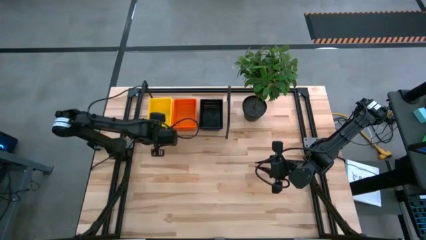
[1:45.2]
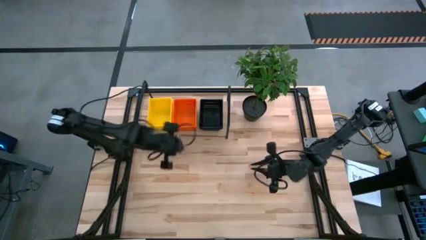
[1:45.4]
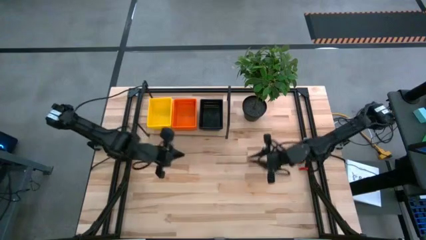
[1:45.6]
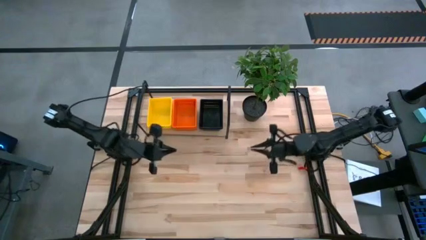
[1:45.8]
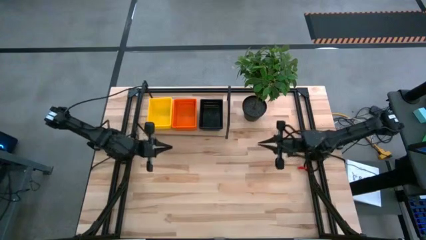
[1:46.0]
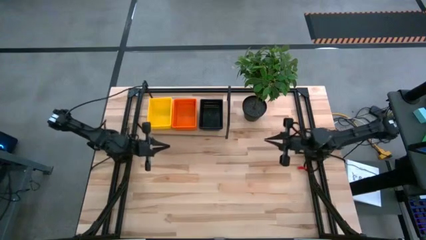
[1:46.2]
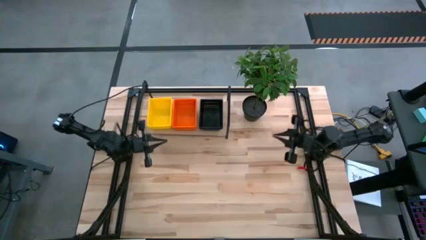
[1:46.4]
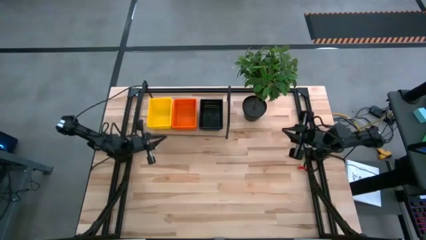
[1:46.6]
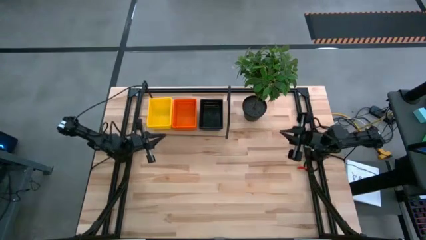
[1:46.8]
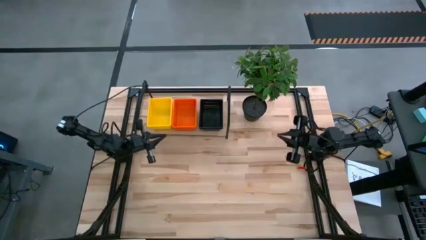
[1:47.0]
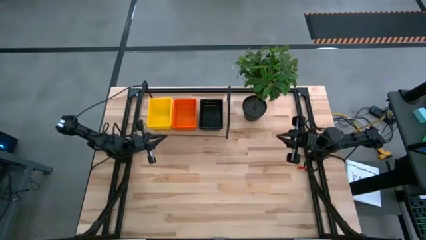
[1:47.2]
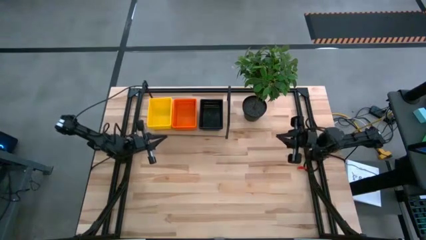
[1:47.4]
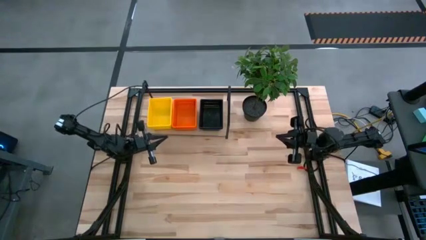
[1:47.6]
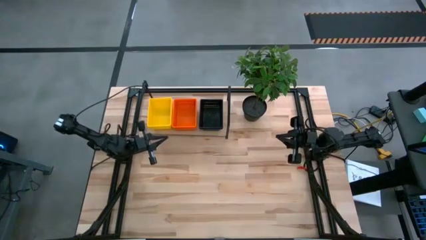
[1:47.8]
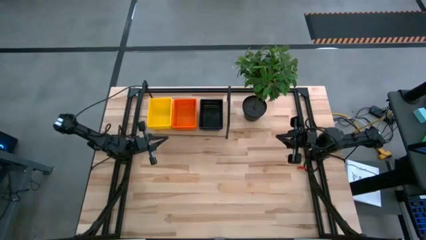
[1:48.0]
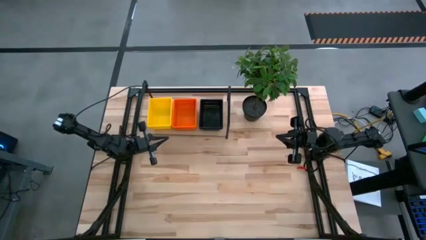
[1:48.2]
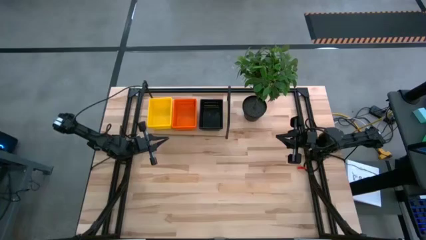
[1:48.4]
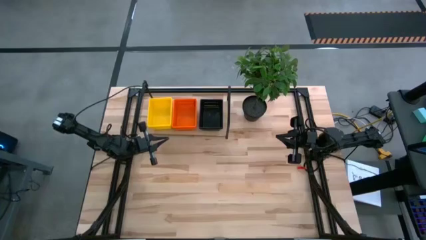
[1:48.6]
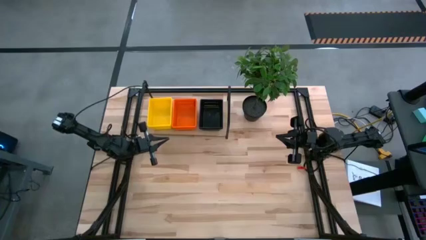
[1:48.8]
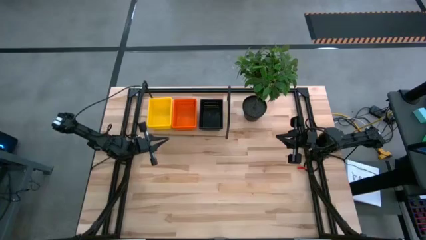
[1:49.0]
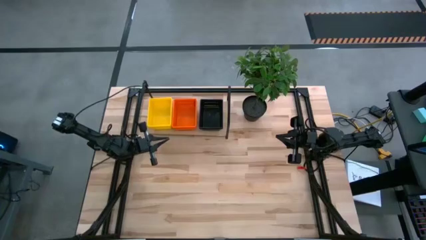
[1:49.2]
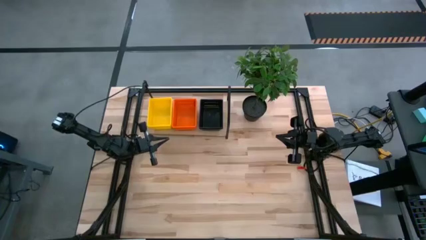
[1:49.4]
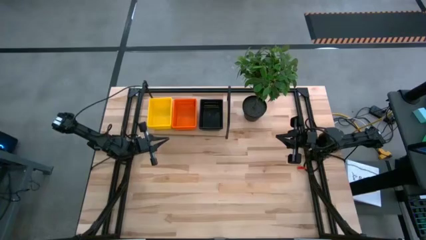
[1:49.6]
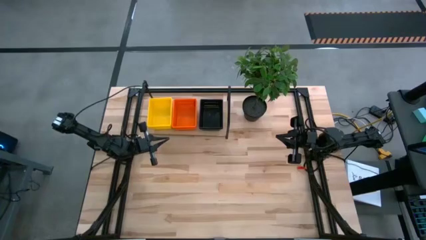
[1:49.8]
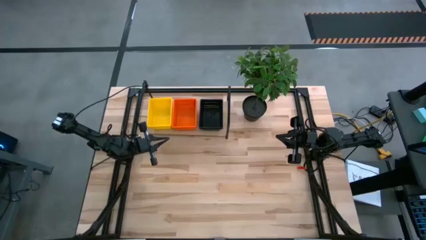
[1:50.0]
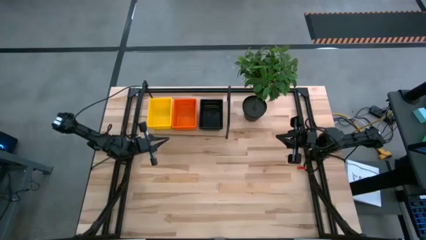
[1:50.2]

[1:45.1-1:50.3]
Task: Stack baskets on shelf by color
Return to Home Position

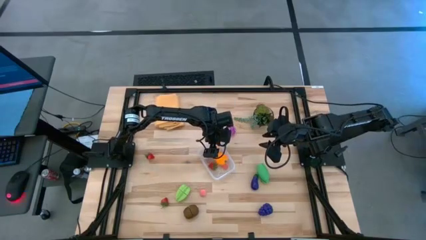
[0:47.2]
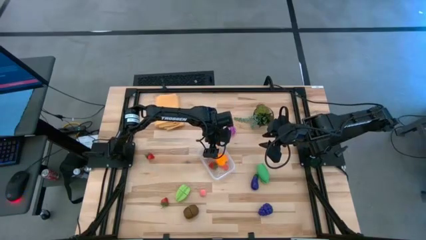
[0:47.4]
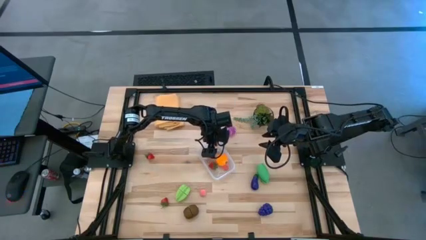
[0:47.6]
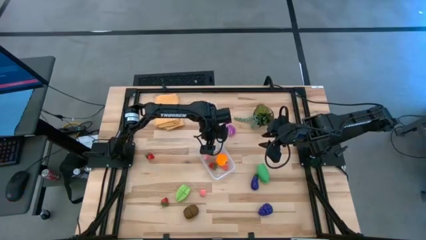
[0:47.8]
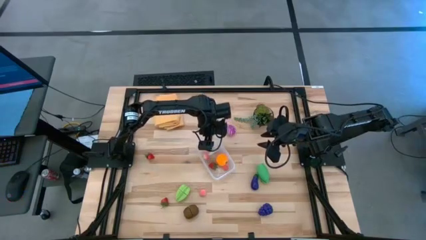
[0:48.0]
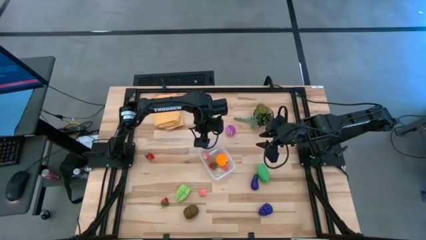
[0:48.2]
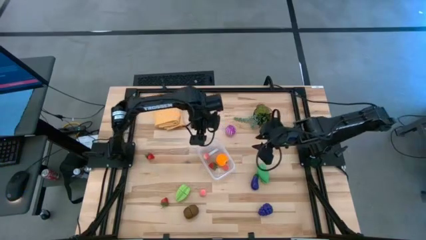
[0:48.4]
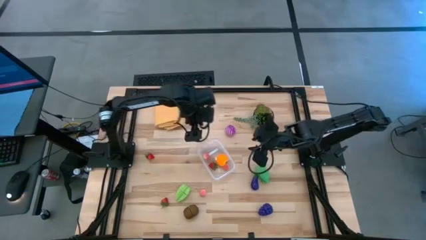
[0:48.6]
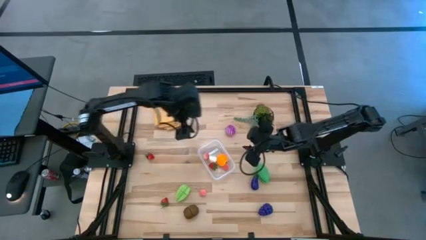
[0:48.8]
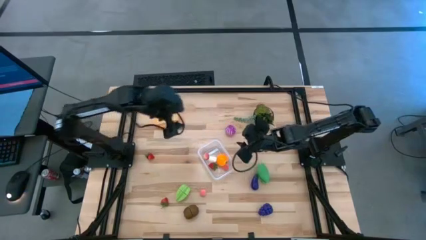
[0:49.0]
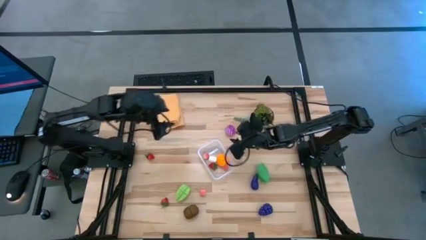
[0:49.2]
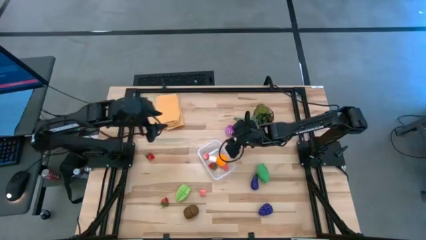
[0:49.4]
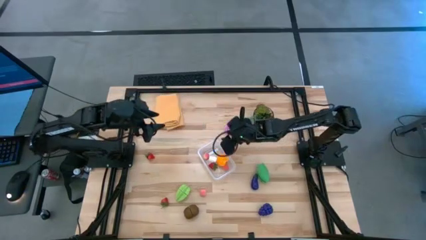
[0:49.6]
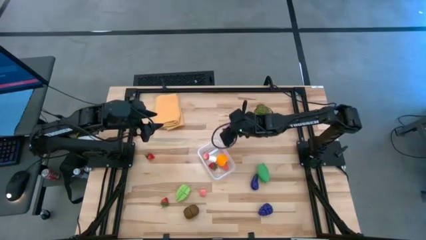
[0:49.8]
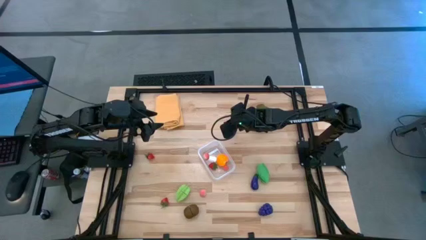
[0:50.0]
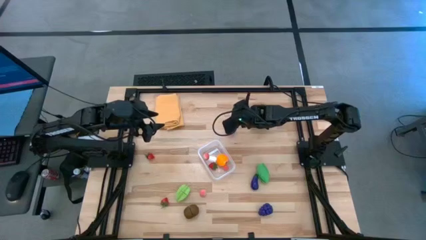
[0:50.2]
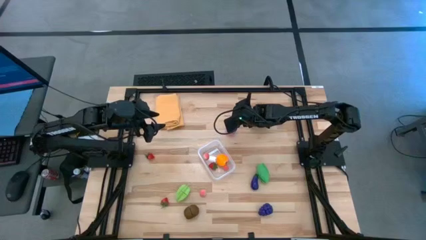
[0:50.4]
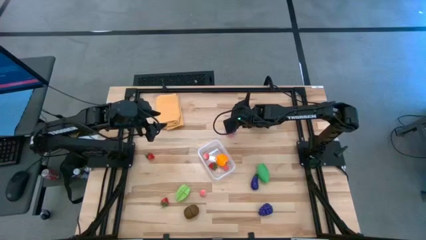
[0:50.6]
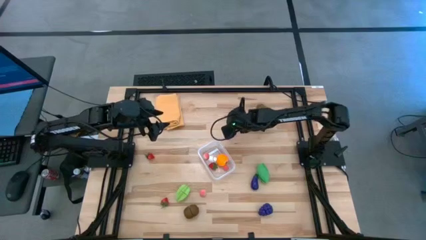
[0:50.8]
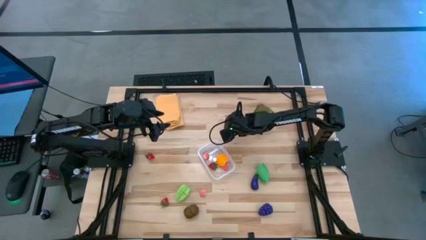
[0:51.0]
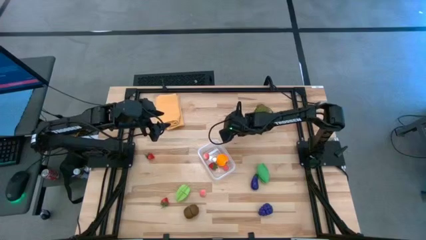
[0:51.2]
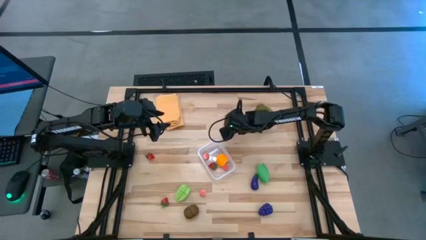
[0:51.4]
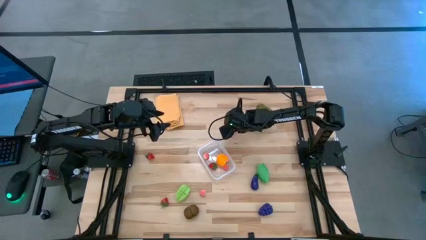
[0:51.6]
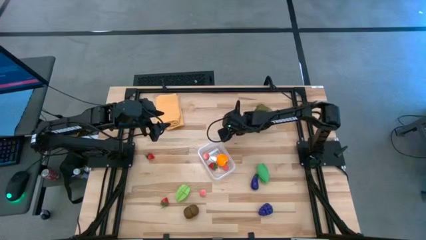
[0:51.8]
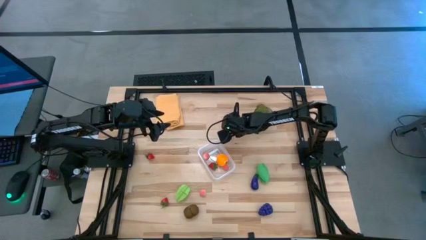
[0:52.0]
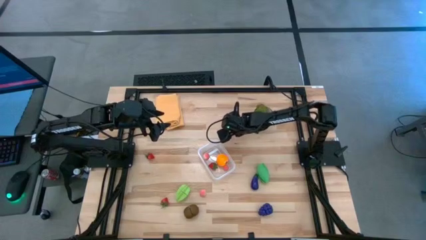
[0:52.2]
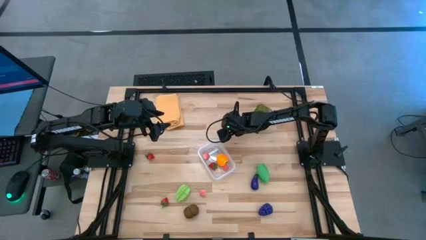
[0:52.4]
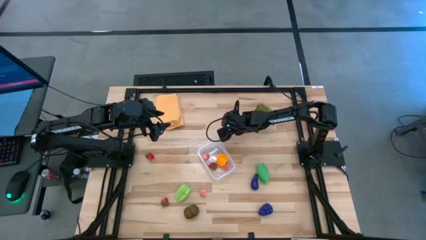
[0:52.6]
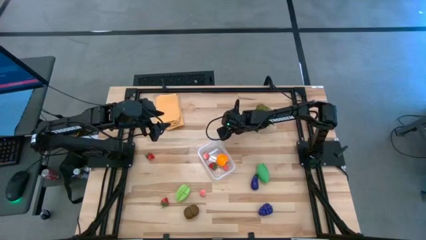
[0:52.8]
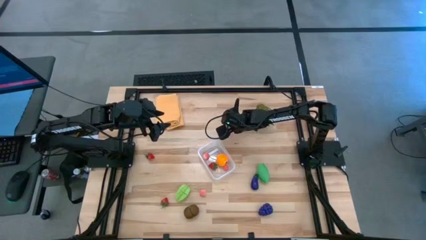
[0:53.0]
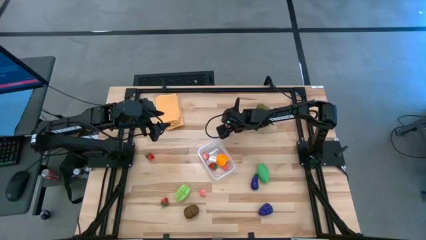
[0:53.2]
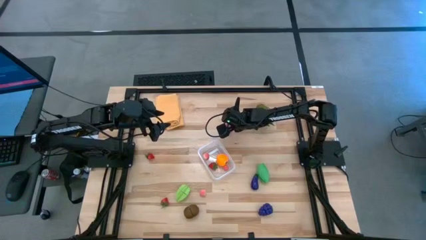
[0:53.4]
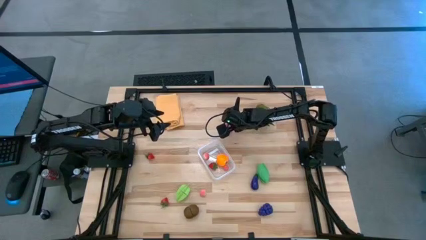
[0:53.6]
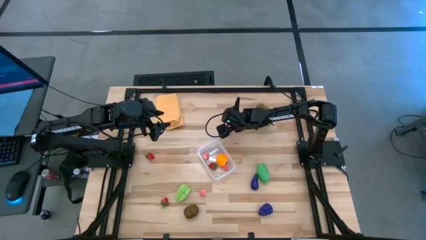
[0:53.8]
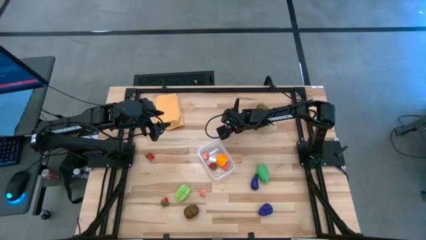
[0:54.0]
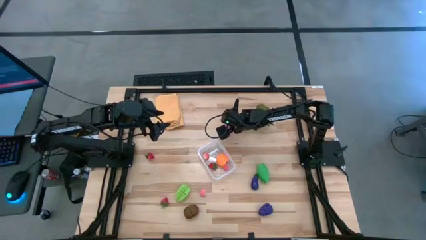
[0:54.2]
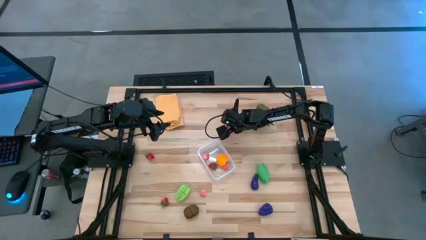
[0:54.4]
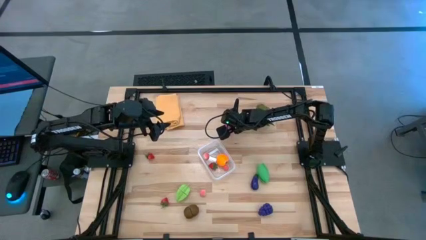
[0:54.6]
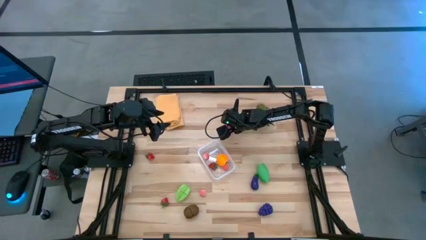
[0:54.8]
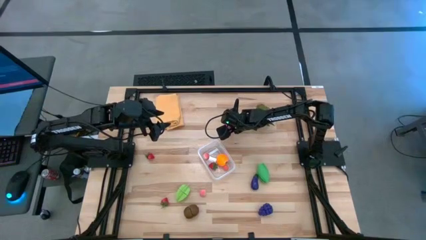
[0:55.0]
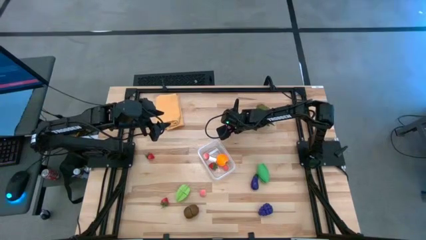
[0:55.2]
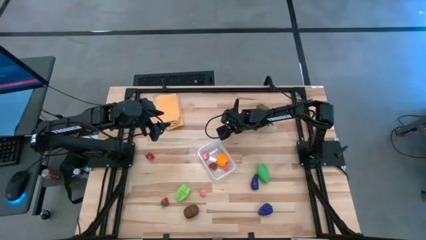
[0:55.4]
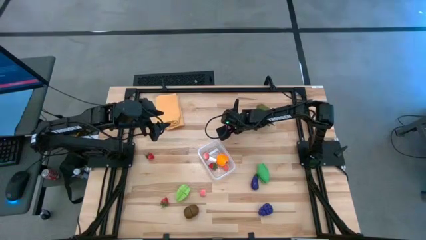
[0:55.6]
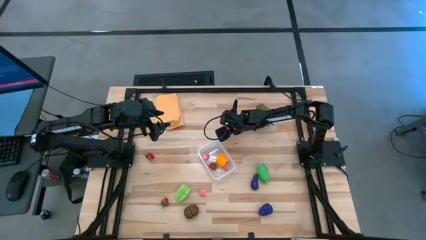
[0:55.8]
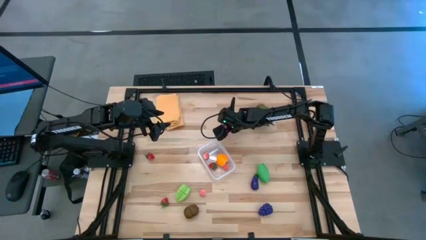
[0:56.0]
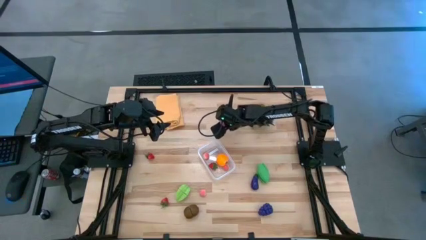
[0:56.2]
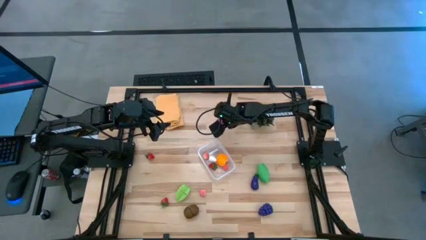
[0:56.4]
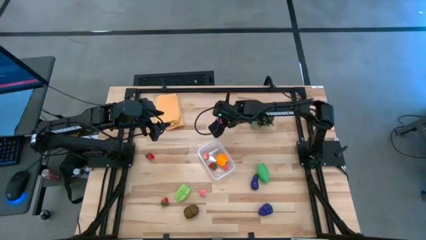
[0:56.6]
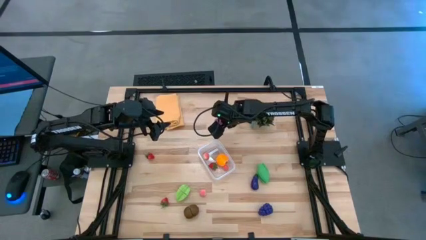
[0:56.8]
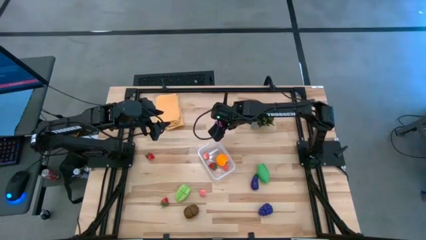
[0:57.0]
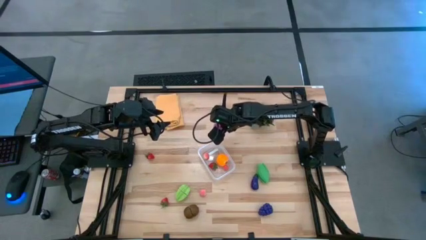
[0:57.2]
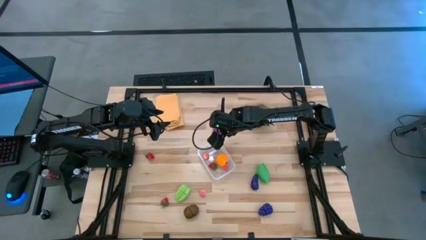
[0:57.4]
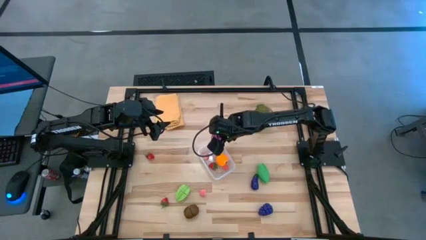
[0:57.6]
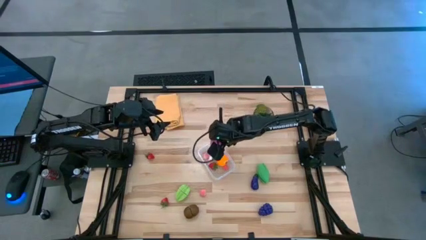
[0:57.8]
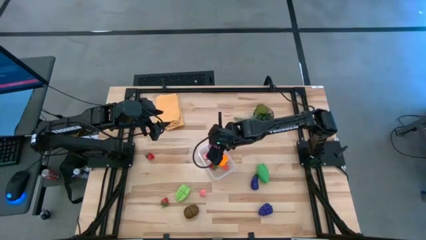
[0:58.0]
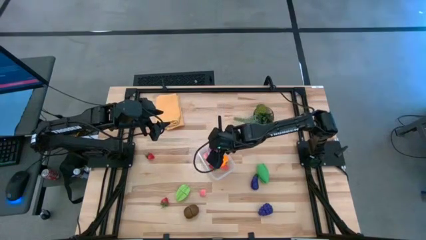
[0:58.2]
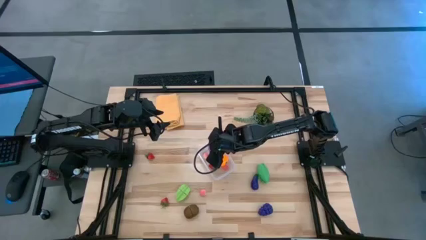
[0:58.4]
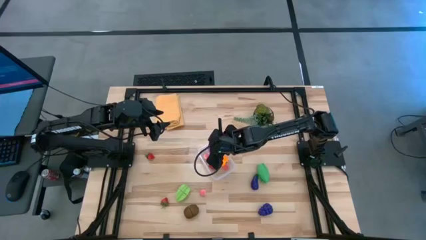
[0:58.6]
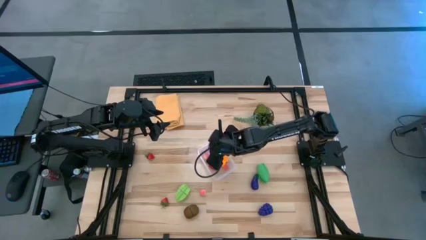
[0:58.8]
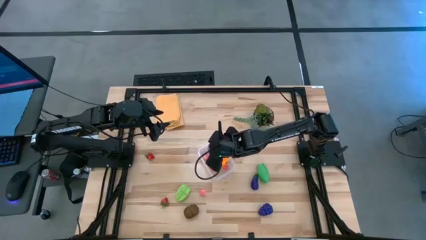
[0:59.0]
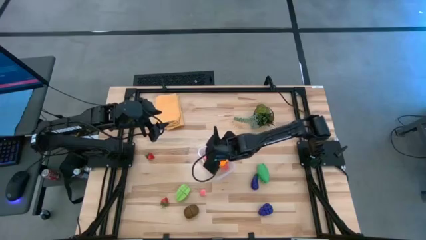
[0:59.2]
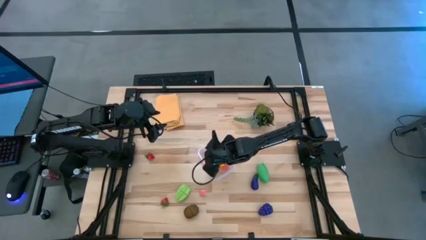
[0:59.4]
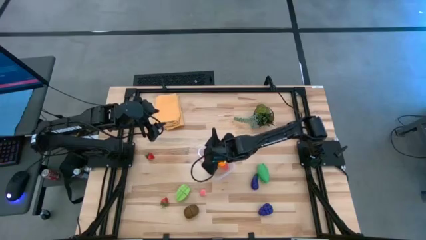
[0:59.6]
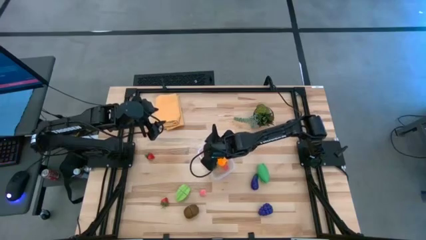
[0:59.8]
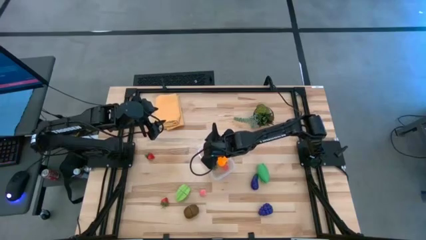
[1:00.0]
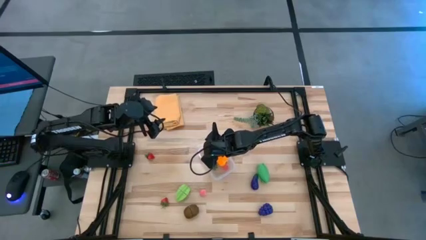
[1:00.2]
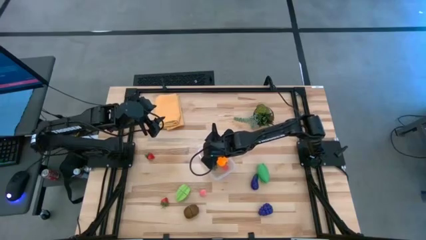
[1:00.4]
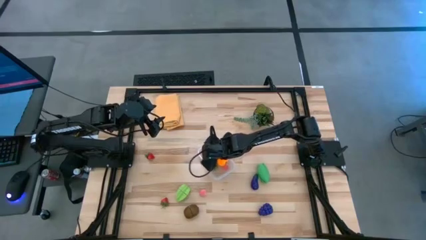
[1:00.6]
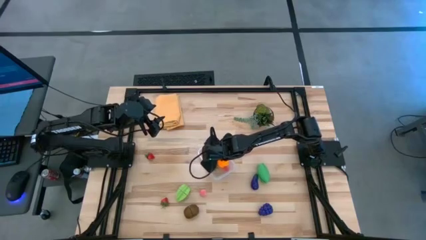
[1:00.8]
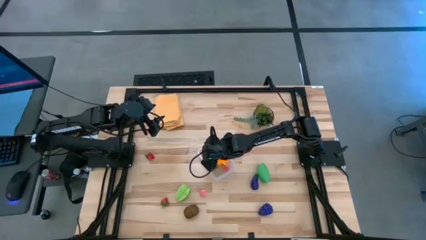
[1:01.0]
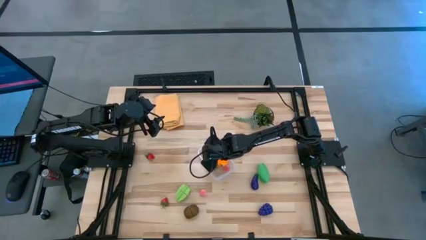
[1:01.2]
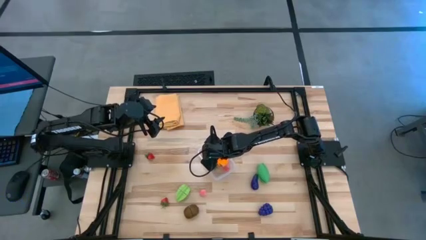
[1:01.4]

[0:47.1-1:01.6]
Task: Pick and placing Produce into tupperware
Put the purple onion into the transparent bin
